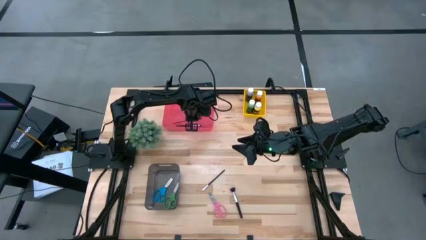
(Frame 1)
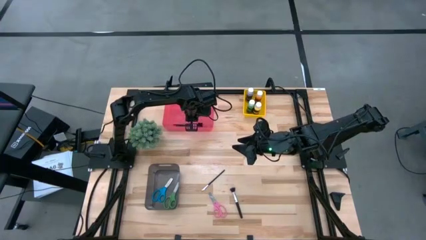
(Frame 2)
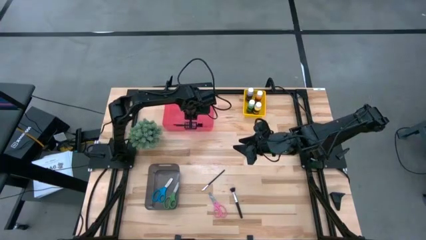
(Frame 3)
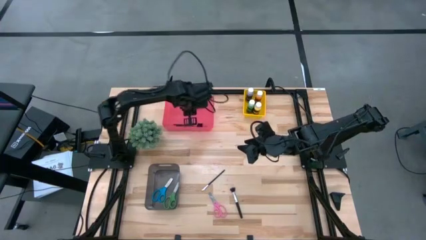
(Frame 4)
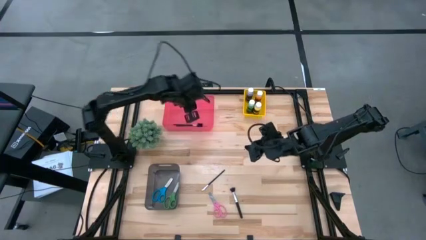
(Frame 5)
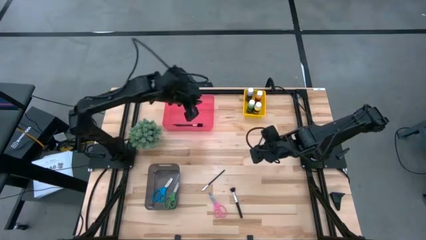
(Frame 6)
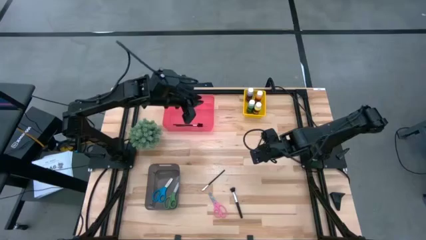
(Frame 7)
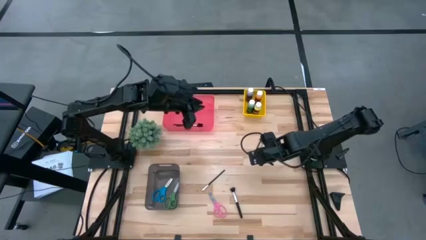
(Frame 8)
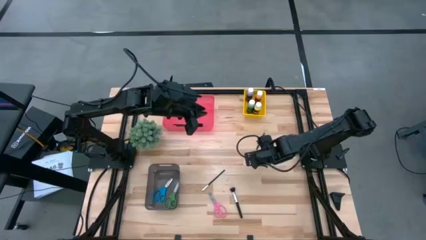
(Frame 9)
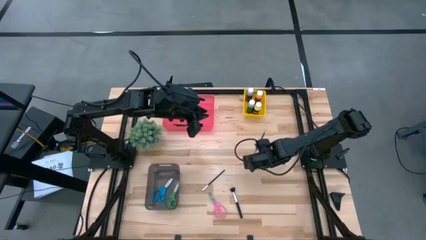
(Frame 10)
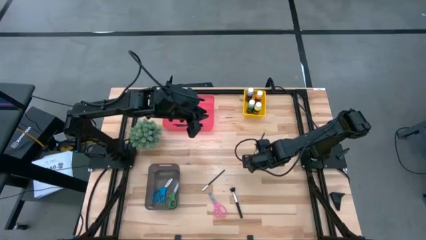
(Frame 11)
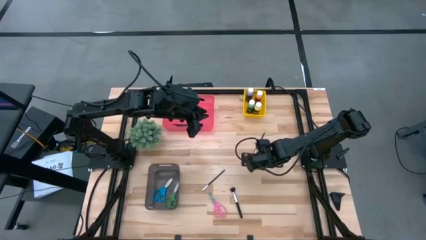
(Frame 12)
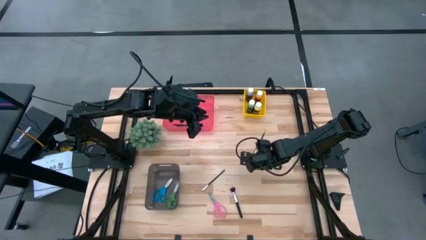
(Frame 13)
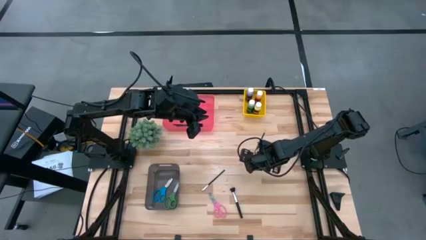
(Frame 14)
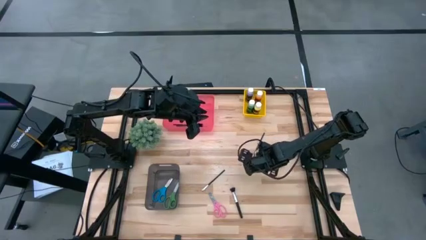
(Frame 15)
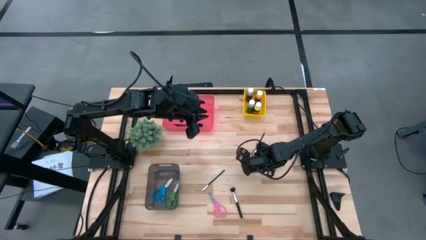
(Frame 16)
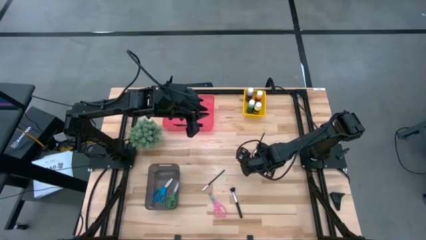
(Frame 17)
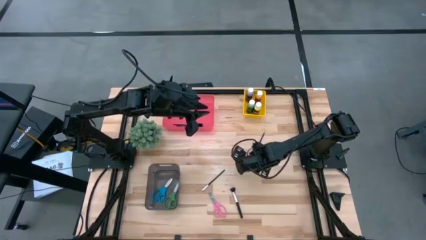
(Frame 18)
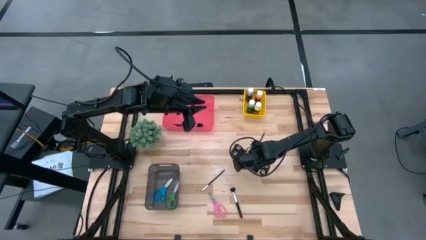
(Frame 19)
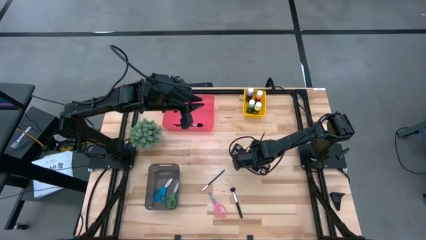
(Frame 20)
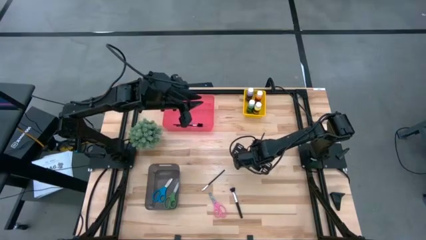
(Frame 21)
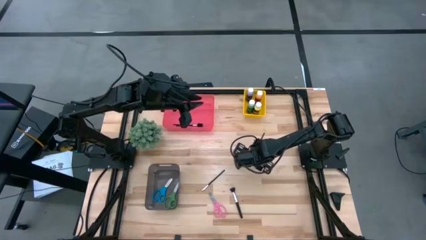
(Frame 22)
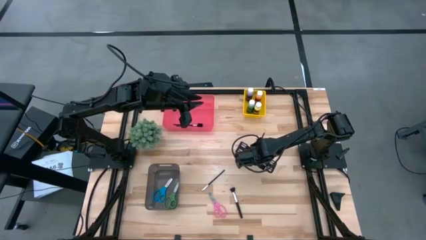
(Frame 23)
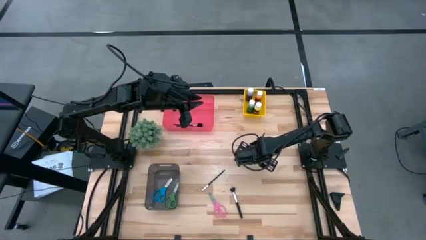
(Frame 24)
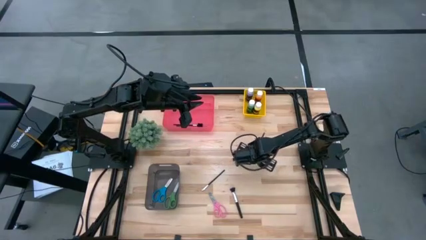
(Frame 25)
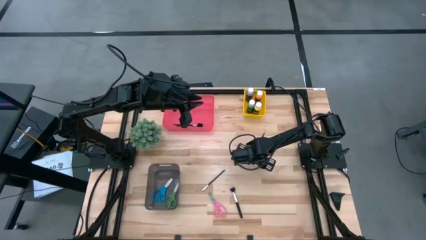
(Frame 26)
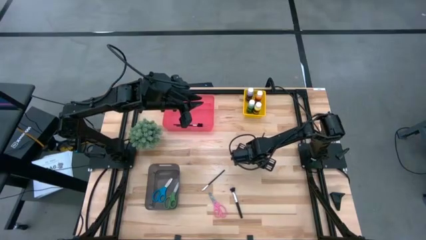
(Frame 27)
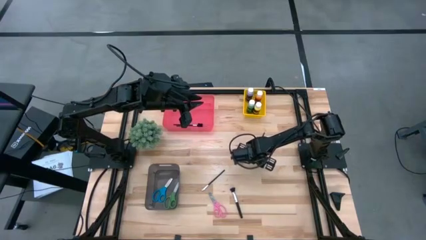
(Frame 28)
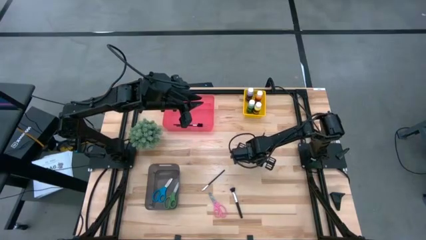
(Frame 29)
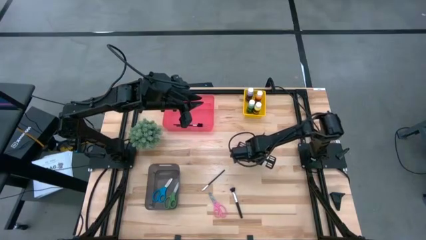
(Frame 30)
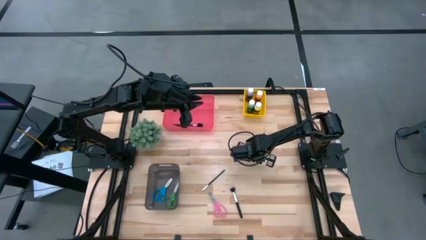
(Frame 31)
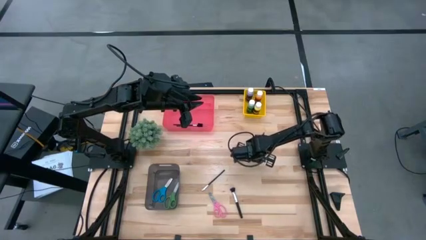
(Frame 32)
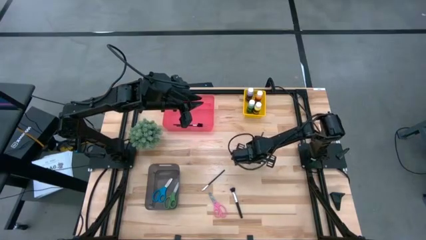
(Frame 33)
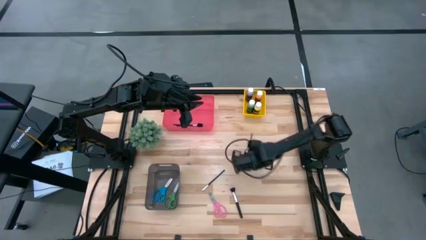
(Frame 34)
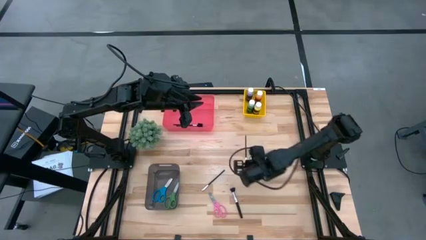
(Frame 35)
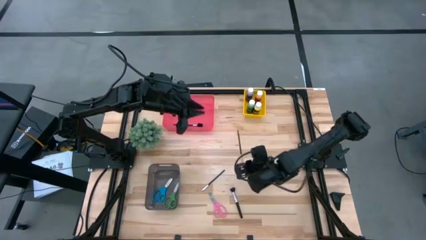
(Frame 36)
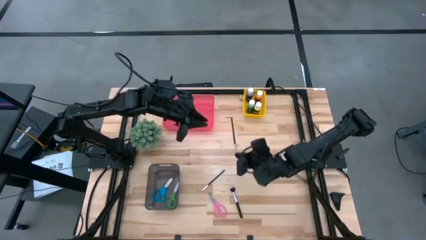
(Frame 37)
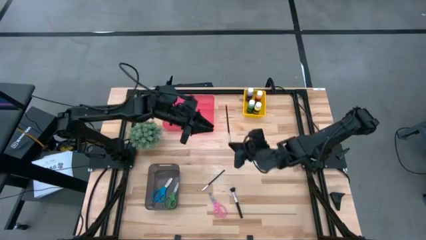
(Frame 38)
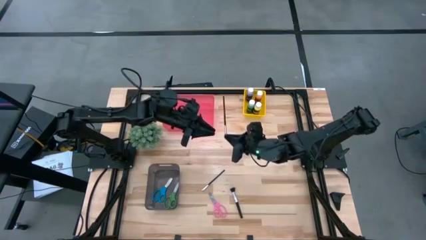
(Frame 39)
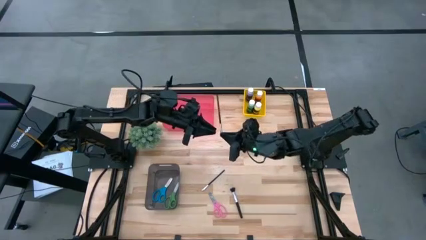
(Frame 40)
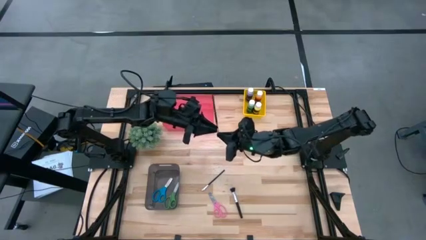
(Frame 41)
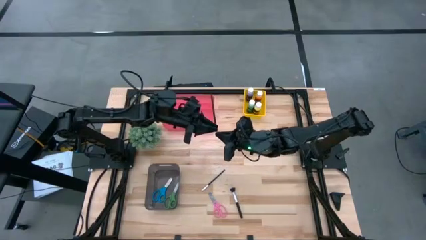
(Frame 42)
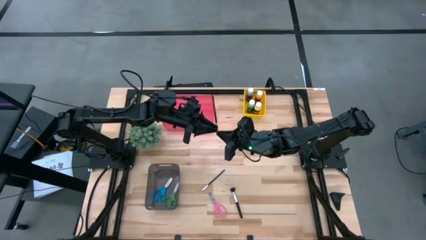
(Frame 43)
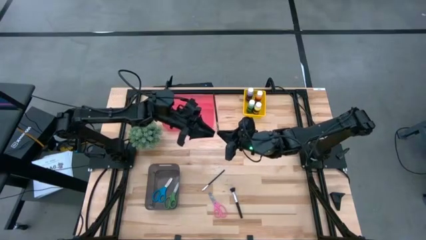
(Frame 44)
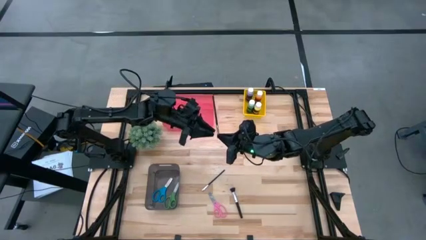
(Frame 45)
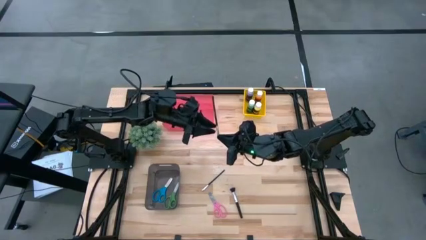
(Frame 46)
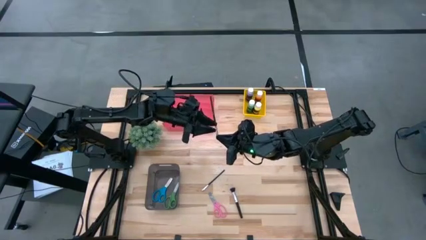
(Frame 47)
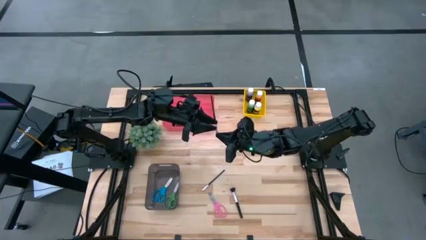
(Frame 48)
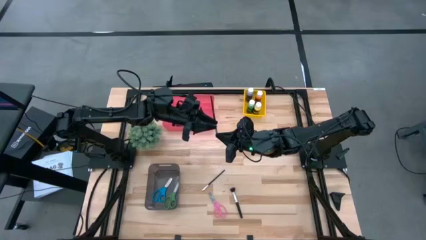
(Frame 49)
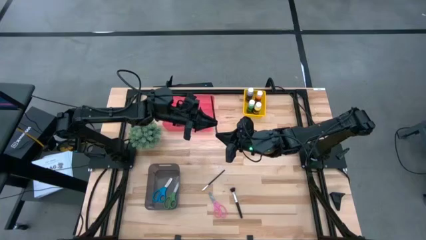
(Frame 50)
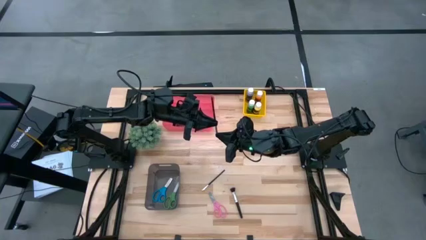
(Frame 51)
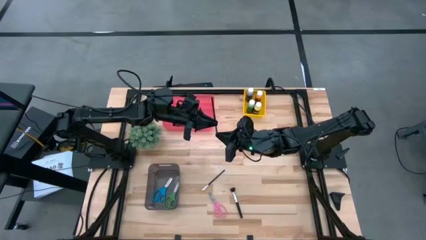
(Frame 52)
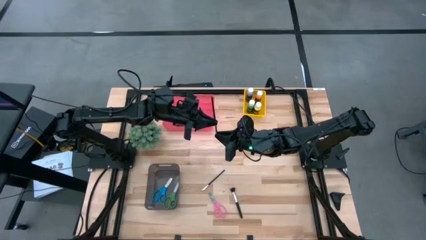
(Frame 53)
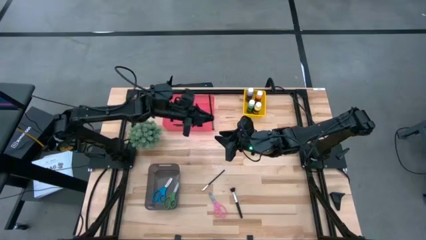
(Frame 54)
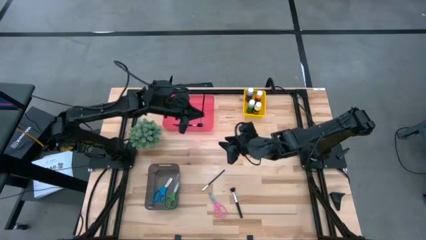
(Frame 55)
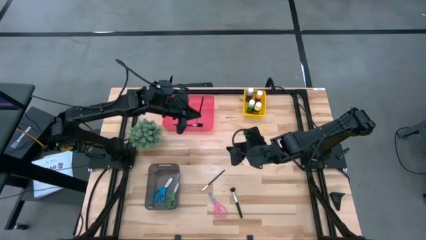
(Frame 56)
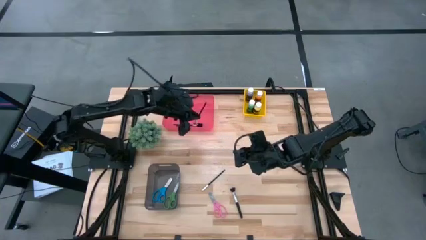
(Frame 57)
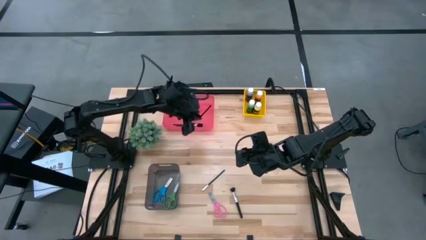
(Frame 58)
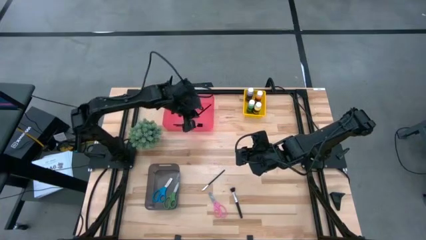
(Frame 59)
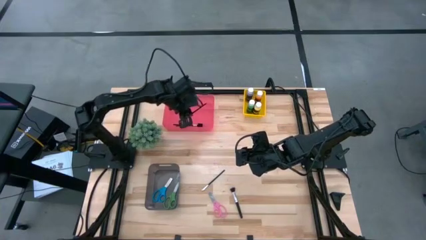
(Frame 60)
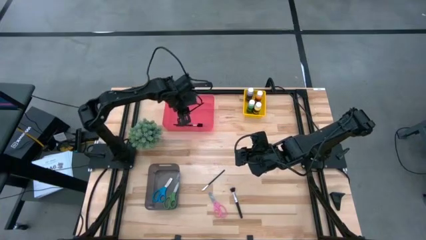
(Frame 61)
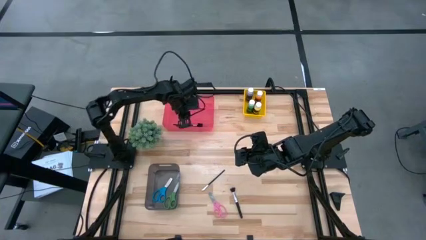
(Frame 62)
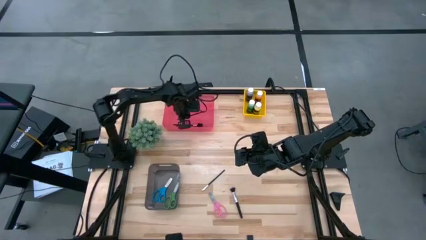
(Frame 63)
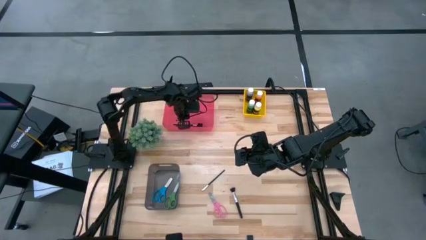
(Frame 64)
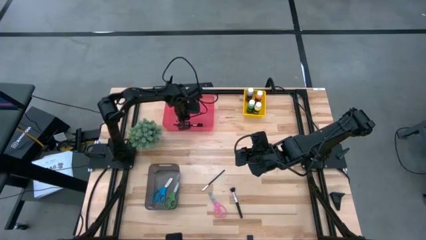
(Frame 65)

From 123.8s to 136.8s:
Task: Pick & Place Paint Supplies
Put the foundation brush into the red bin

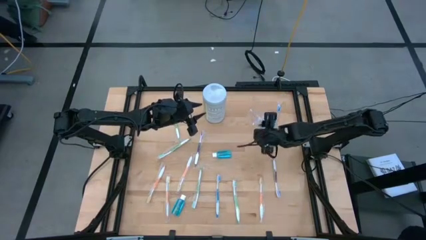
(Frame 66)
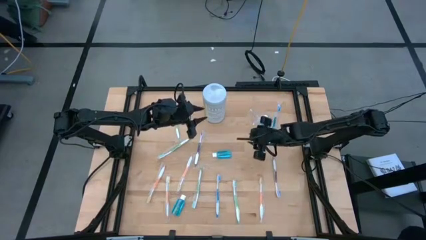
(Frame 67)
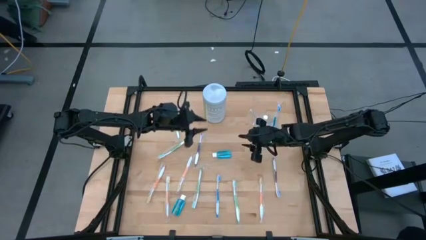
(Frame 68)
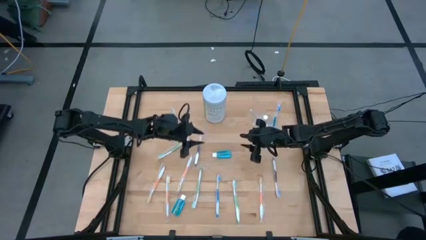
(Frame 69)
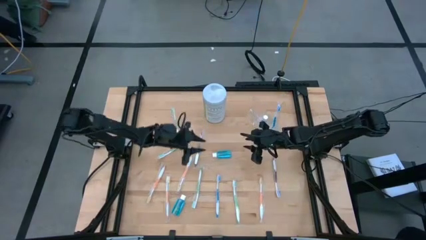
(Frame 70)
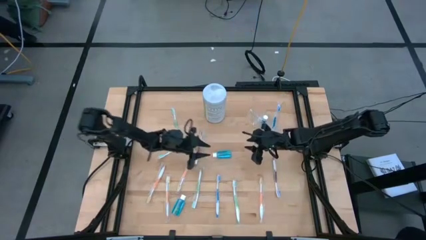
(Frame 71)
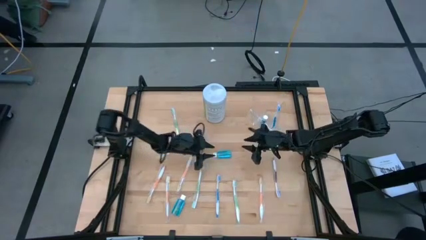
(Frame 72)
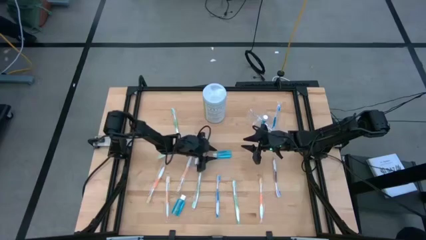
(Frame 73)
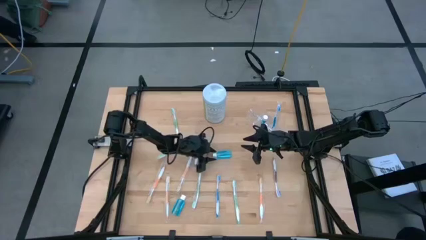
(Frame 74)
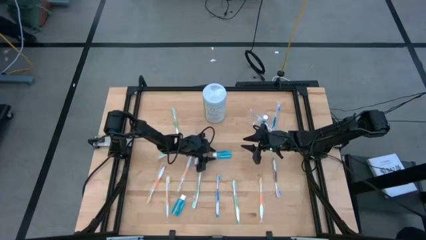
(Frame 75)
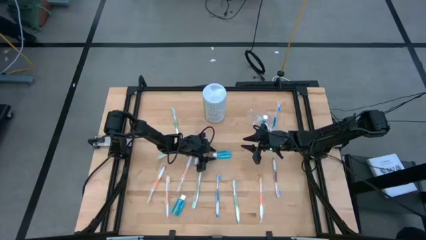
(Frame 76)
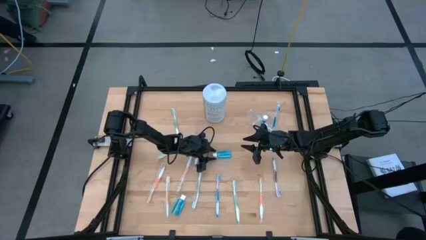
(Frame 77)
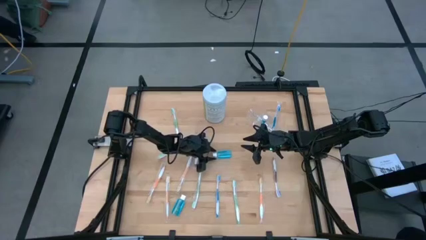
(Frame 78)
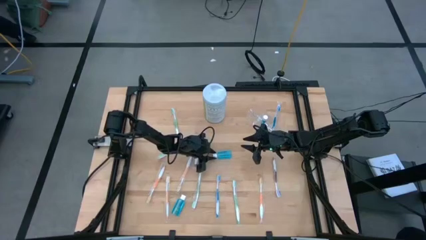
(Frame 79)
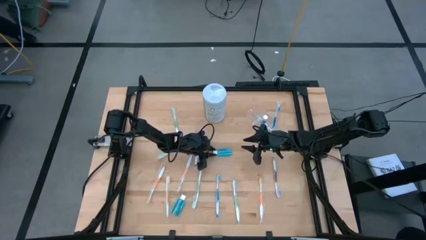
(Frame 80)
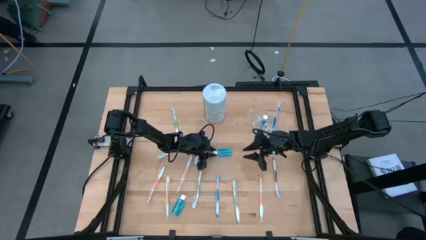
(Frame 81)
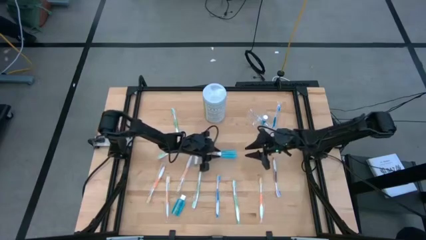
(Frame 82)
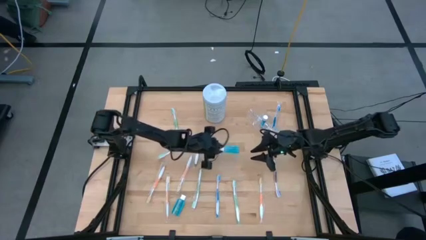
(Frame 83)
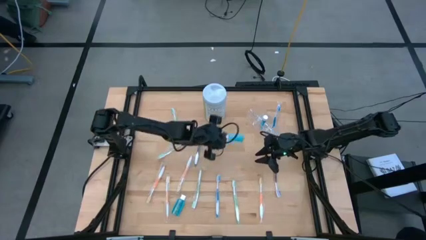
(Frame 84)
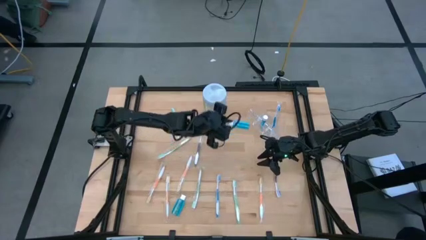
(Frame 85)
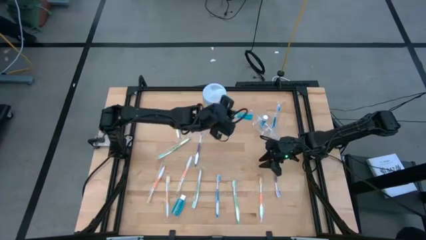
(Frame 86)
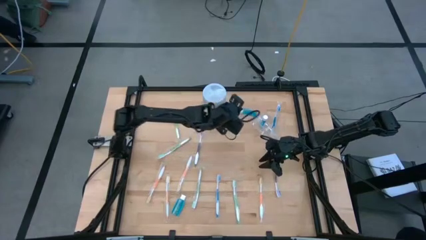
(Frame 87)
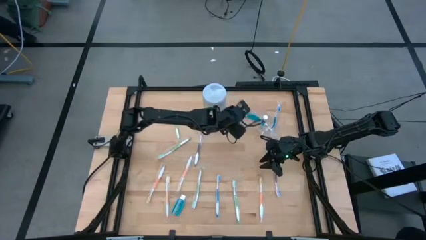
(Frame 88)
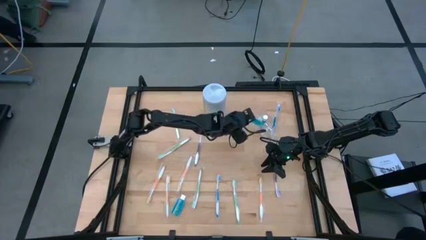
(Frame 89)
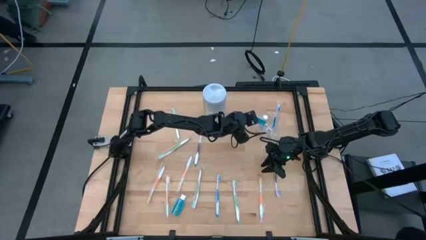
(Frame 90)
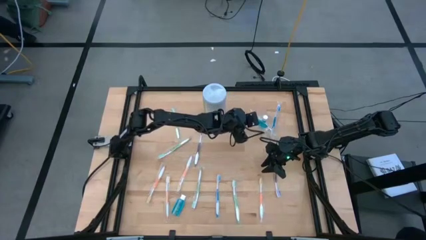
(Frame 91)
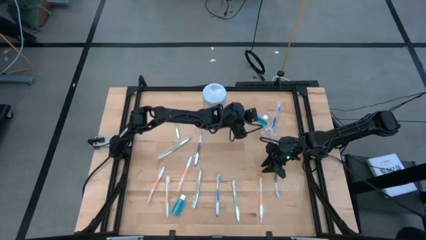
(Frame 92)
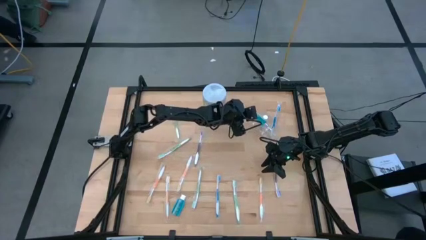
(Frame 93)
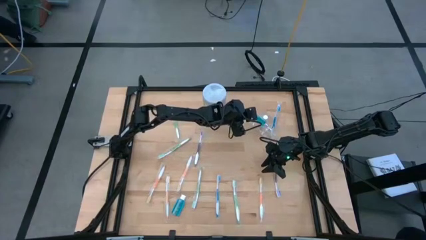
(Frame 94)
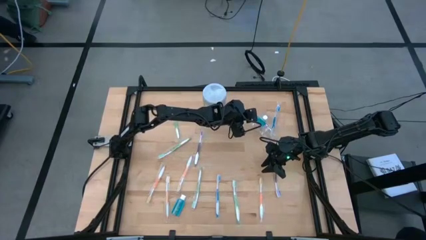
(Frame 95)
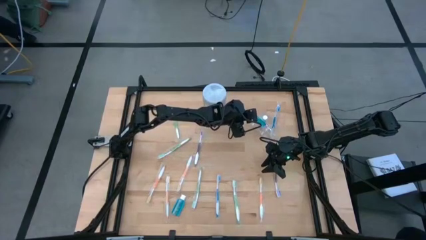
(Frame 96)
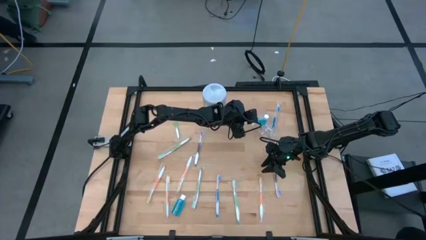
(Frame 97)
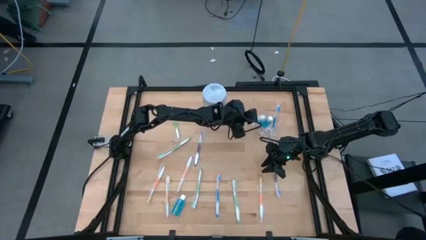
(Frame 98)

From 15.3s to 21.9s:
Task: Pick & Place toothbrushing station
Put the blue mouthwash into the transparent organizer
